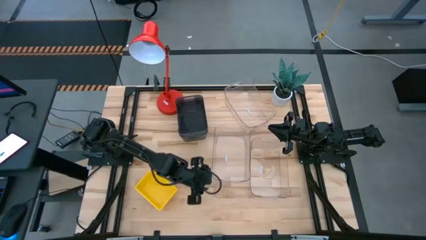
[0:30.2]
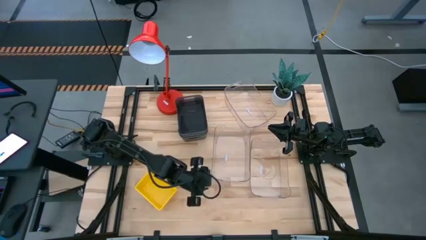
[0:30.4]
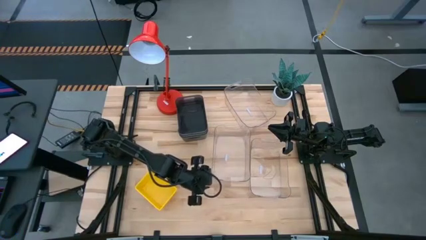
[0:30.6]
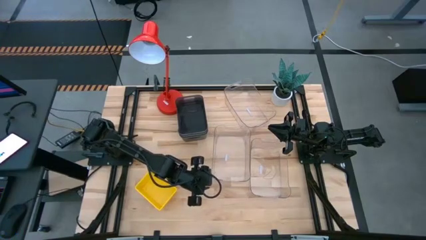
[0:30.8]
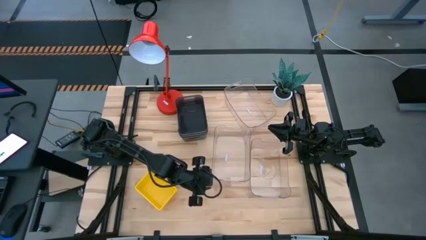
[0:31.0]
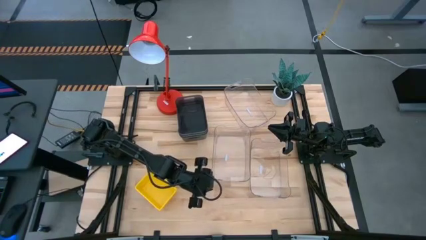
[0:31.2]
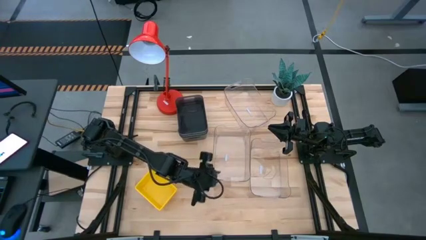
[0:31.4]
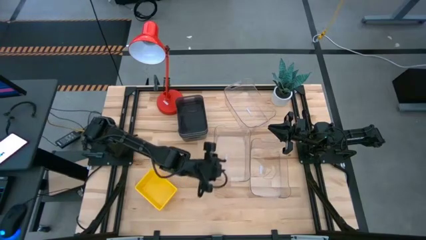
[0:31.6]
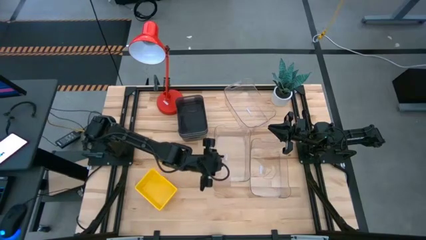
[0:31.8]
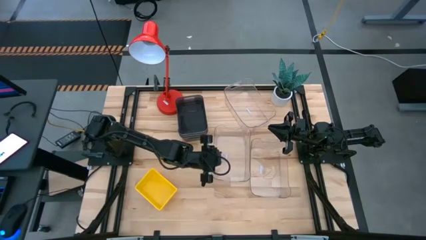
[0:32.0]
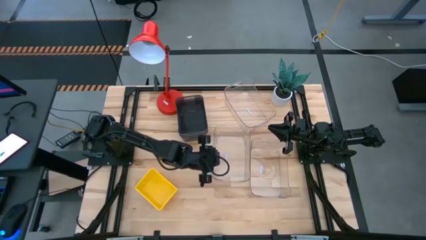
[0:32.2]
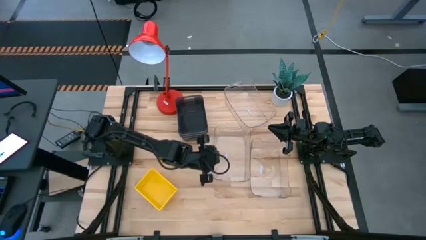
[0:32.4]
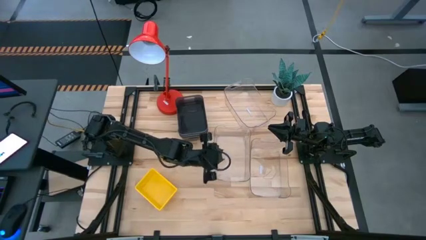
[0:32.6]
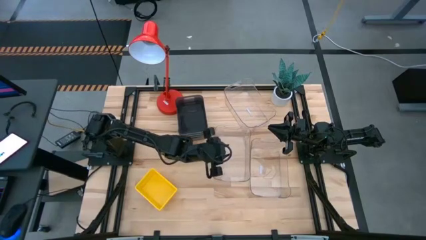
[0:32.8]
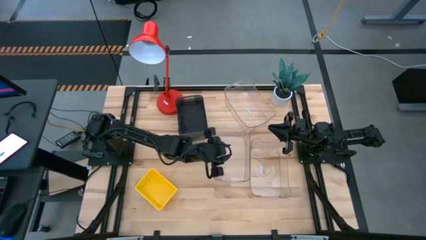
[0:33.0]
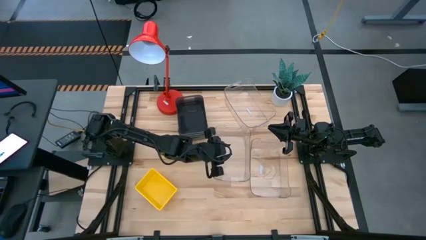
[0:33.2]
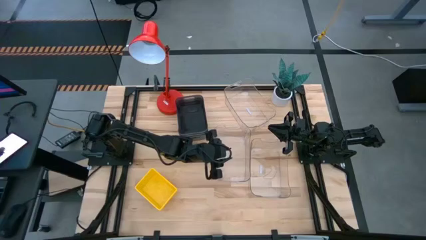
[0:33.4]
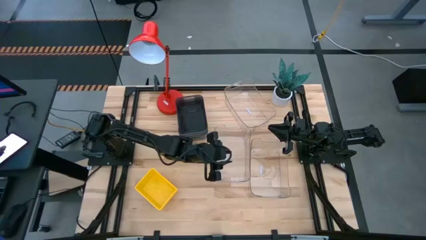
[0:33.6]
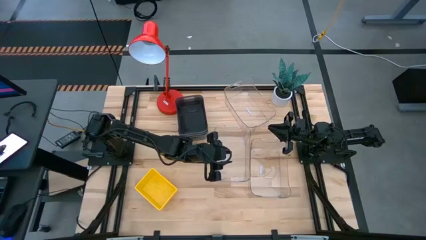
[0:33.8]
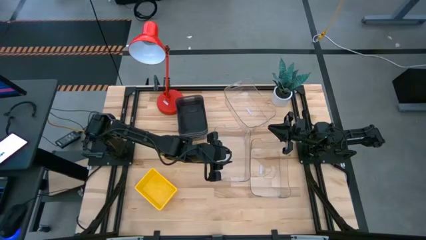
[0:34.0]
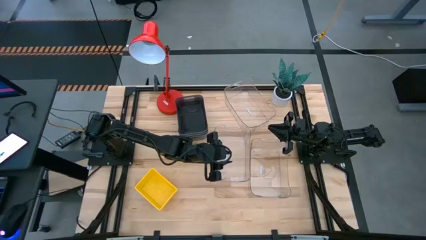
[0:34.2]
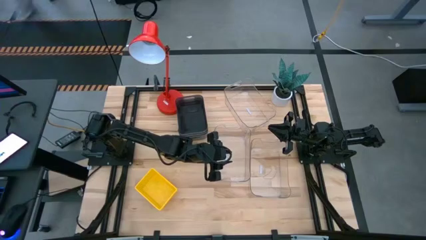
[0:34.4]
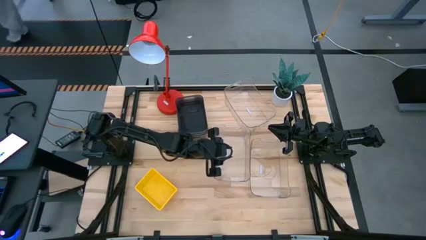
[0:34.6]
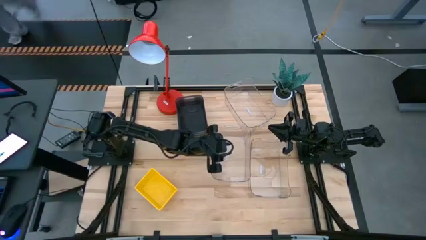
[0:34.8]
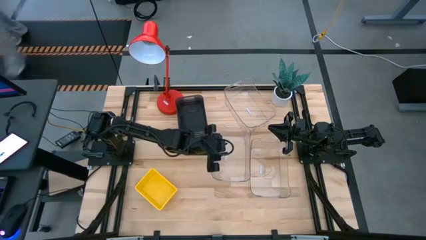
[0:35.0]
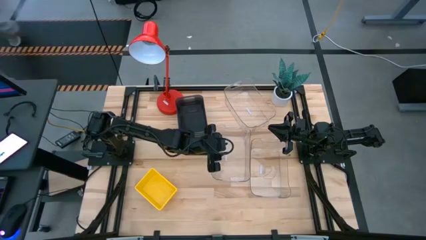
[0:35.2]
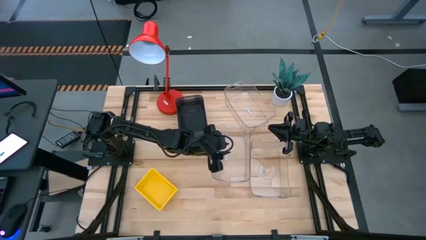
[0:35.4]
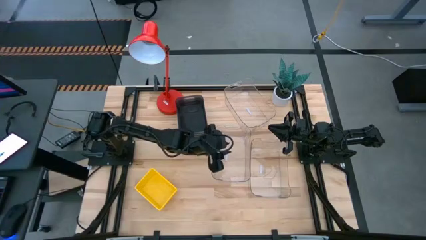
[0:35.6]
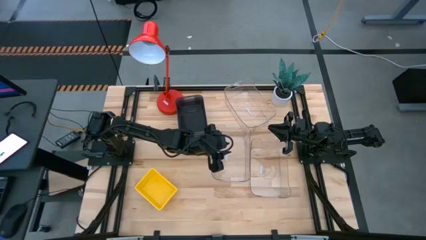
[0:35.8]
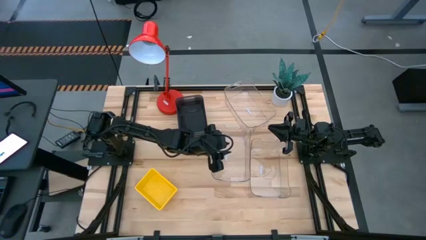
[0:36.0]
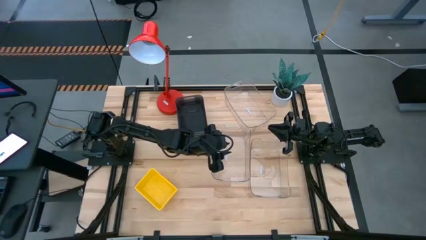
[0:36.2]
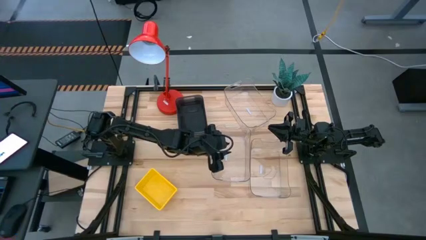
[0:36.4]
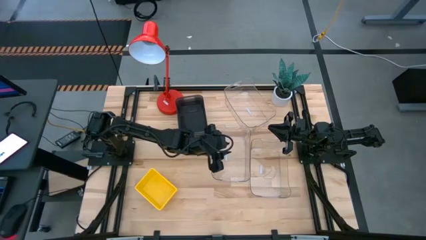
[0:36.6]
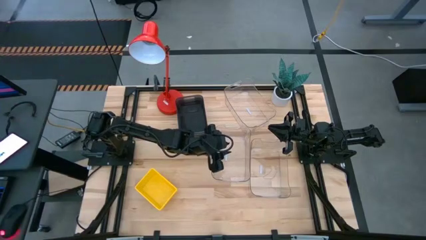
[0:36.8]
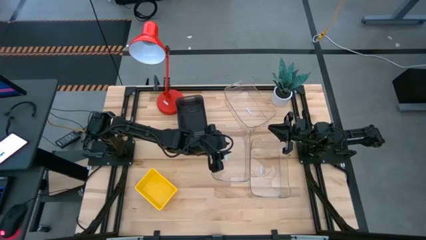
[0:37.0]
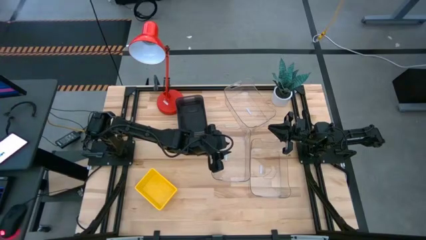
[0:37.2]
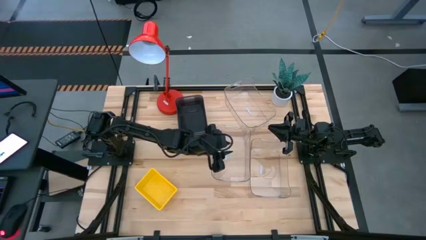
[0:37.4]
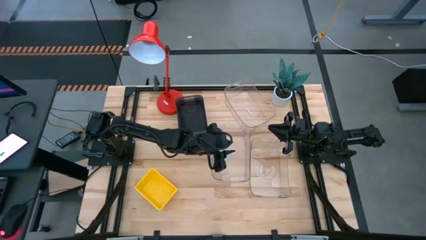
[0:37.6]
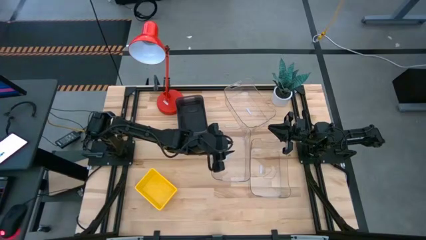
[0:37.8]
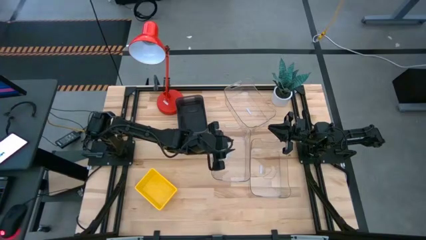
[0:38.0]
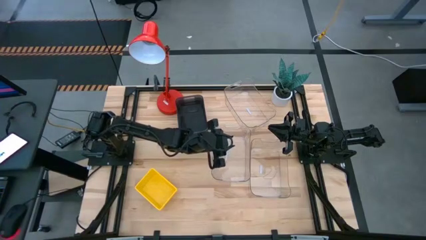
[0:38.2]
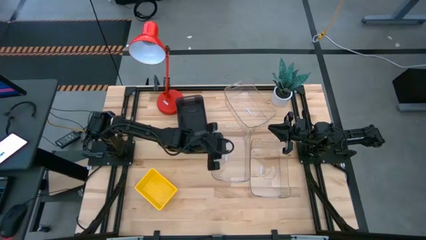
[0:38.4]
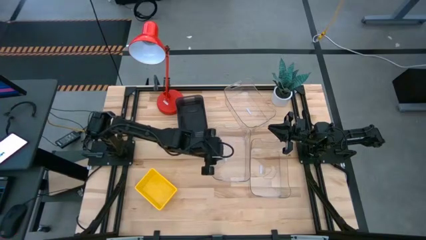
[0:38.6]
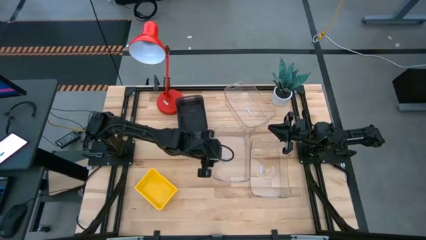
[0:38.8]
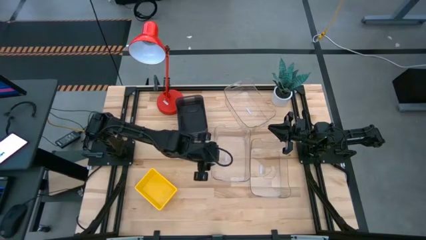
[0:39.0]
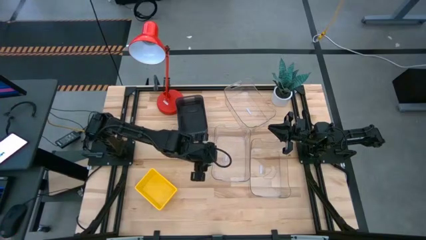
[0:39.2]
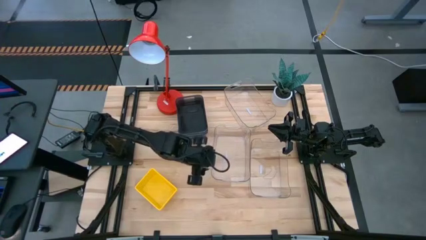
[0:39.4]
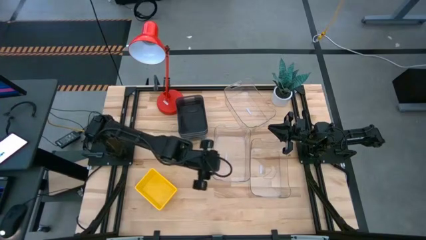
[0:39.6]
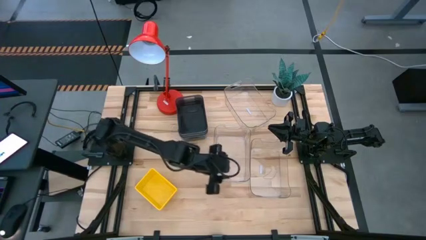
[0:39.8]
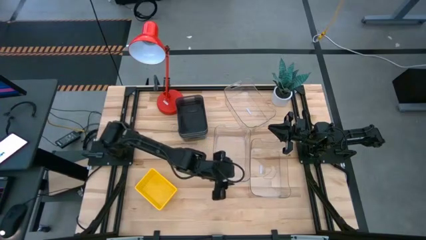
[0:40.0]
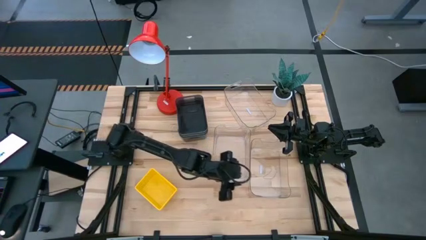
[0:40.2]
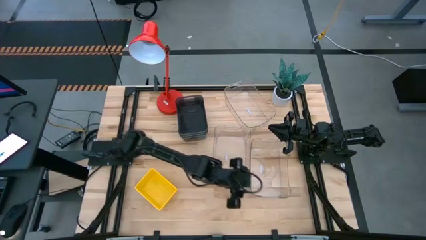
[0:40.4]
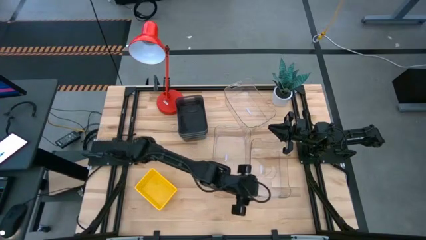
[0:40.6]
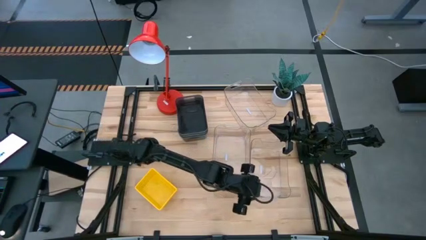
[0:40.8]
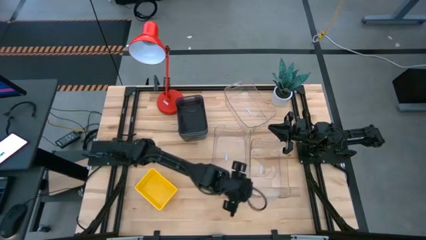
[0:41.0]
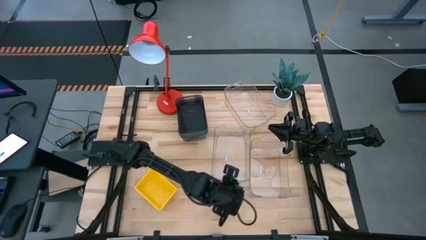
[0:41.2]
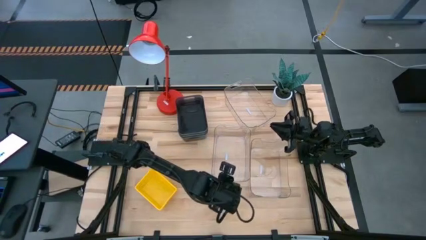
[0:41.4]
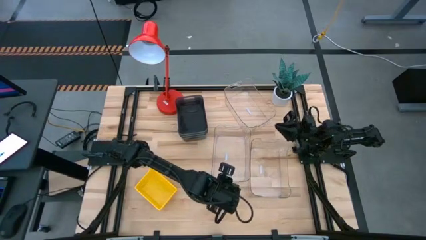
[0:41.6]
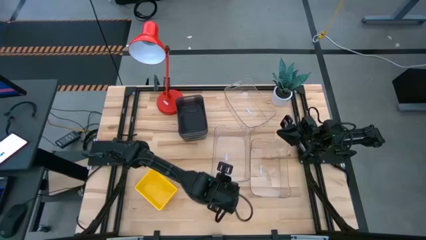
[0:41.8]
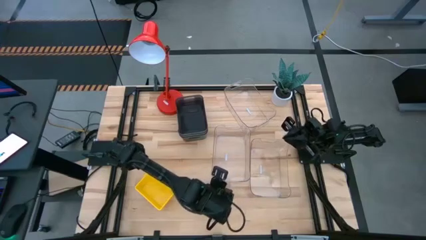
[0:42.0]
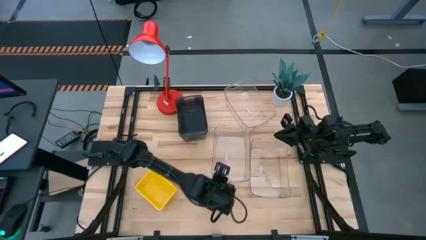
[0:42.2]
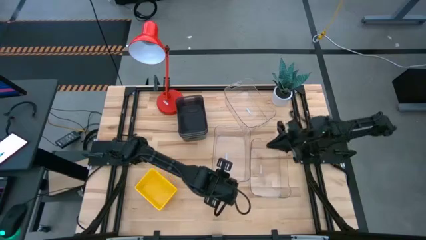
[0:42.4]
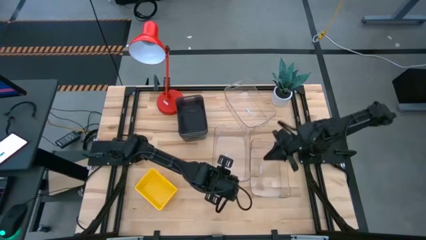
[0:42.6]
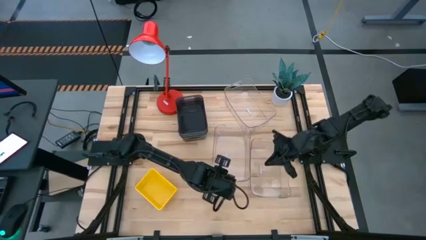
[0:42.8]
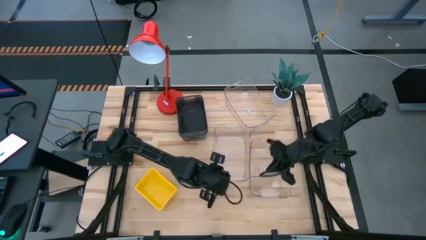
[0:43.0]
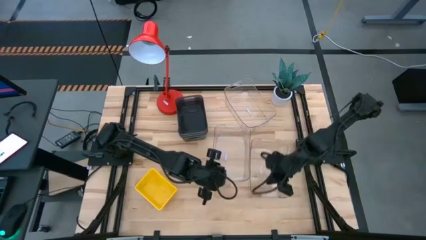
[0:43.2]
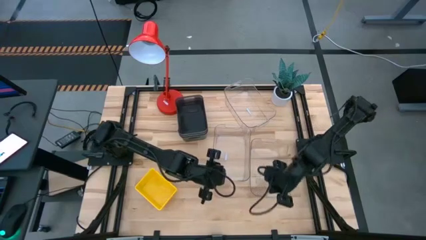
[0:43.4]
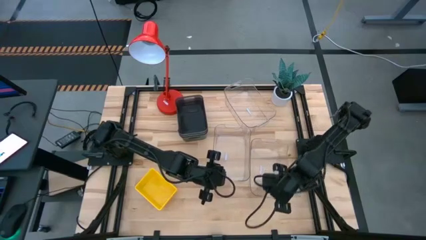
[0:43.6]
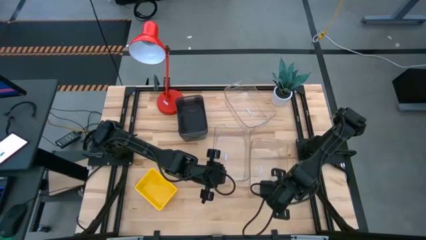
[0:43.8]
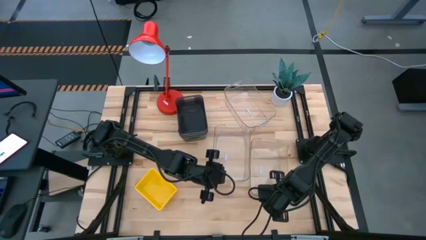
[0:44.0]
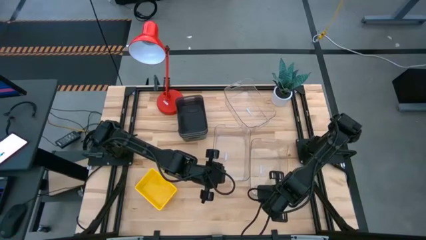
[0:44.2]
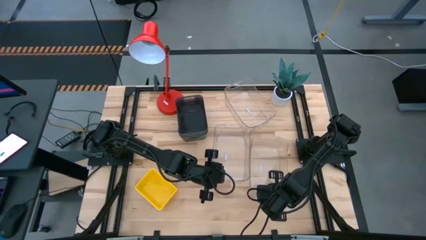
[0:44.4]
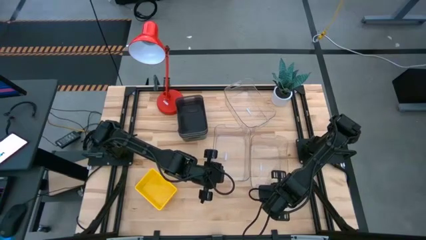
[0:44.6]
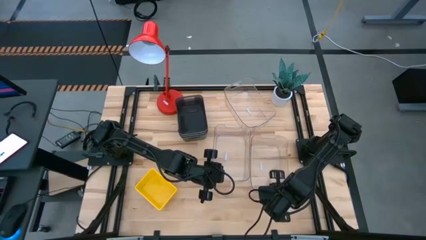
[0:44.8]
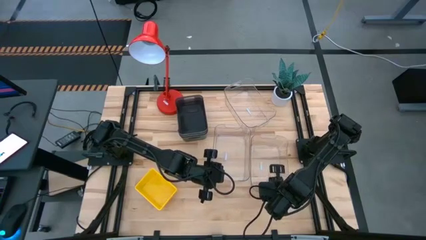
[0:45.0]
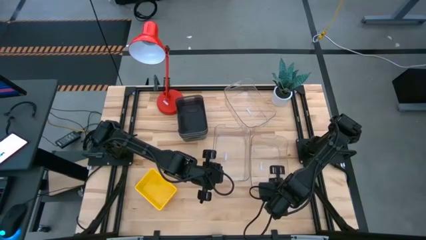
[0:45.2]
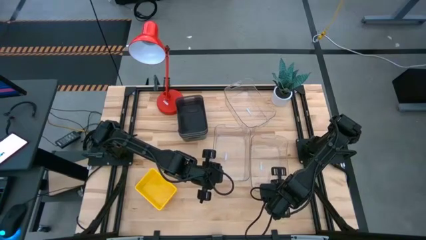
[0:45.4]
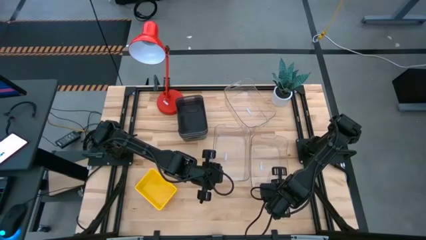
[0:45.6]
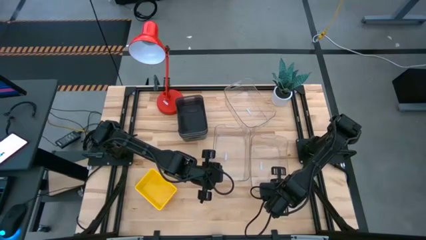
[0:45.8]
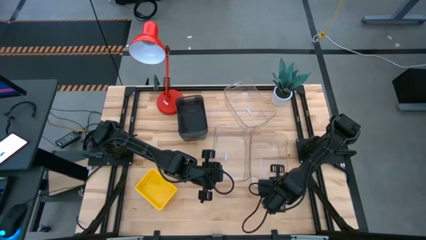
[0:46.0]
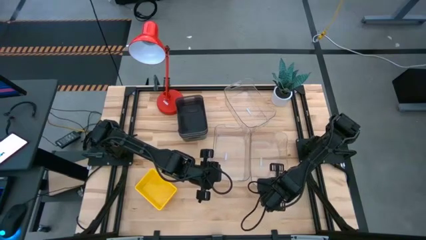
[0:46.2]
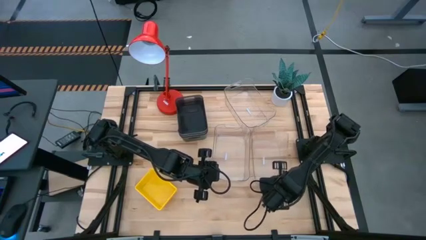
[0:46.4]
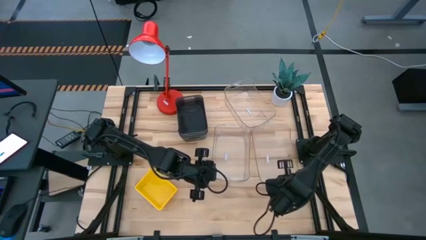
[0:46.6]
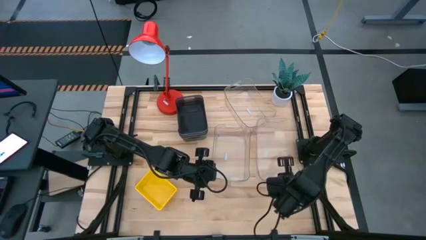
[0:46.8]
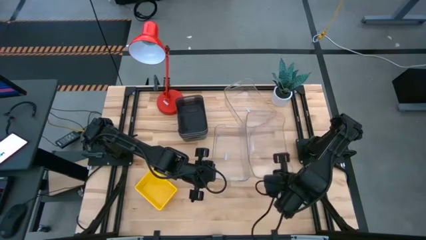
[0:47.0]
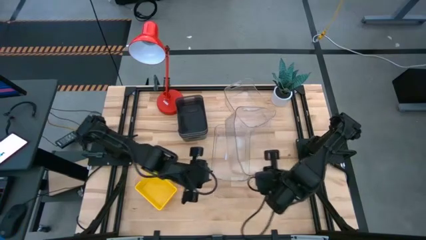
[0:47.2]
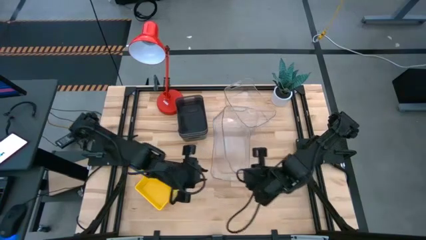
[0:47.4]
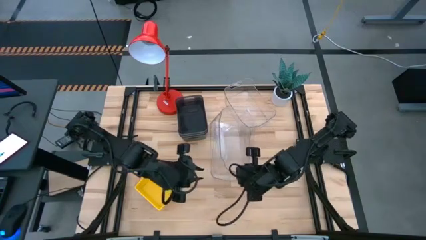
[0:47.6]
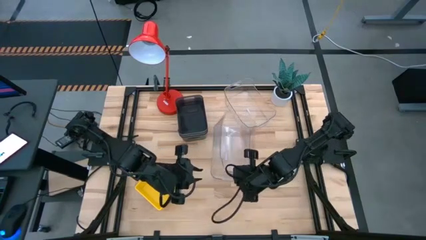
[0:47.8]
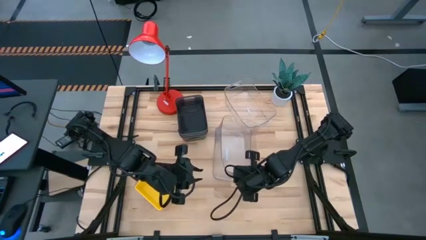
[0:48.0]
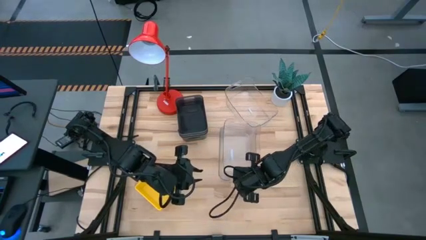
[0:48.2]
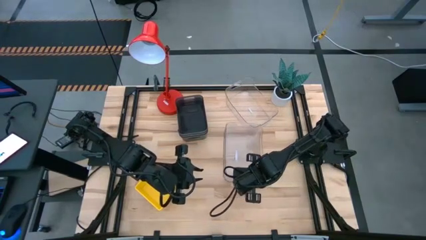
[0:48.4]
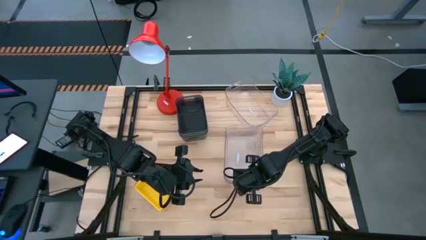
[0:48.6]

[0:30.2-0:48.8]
Stack the bottom right transparent bin on top of the bottom left transparent bin
